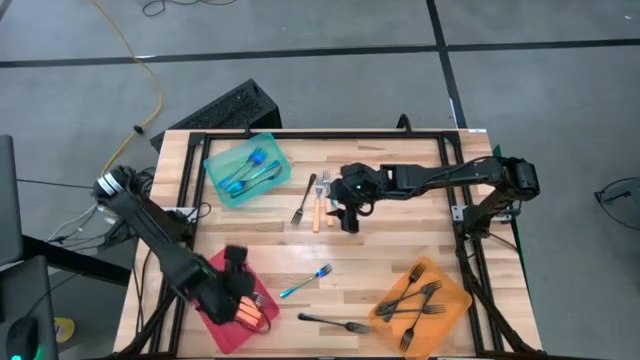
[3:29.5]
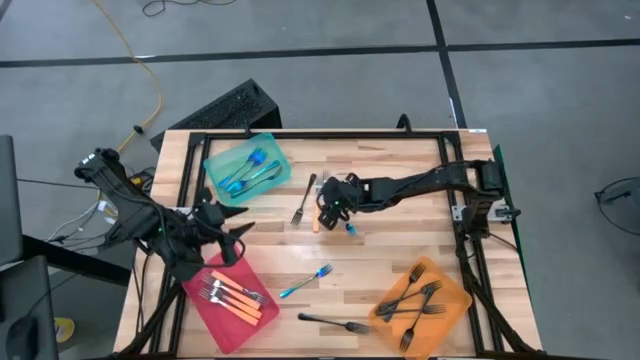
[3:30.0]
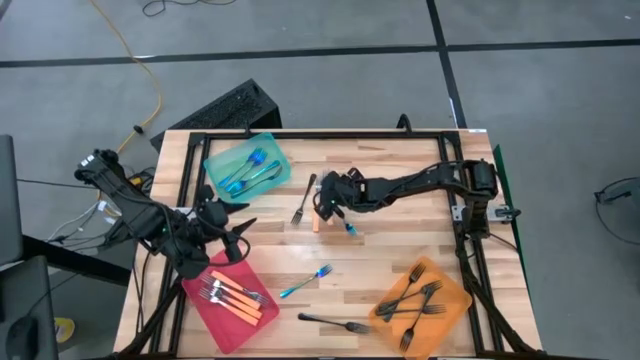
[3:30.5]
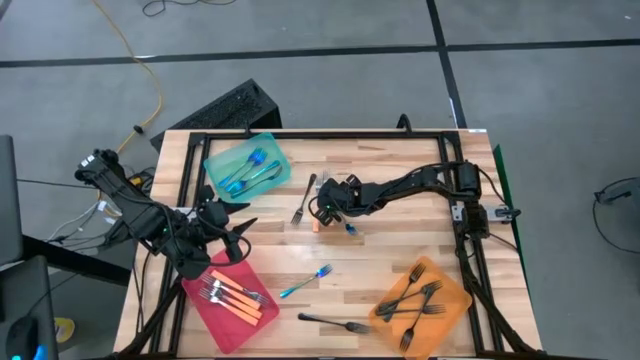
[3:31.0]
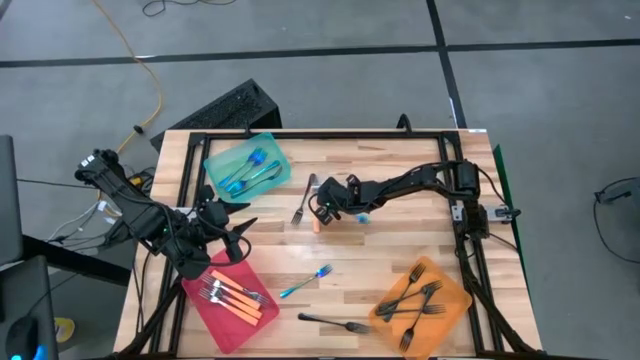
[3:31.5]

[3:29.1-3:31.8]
Task: Sort silverware by color (type)
Put the orange fork into the red bin

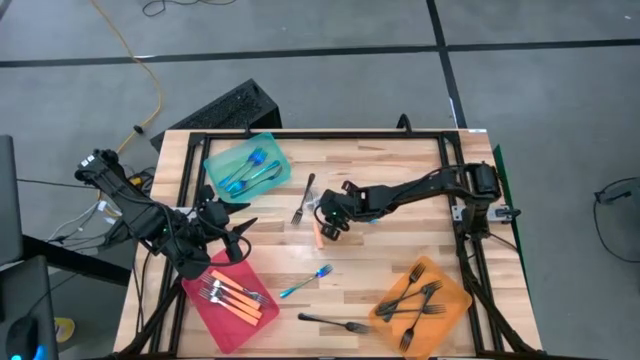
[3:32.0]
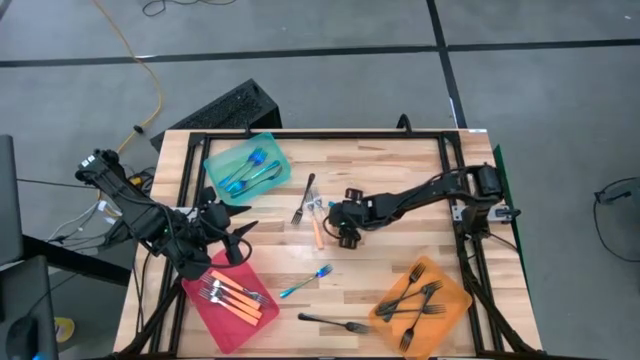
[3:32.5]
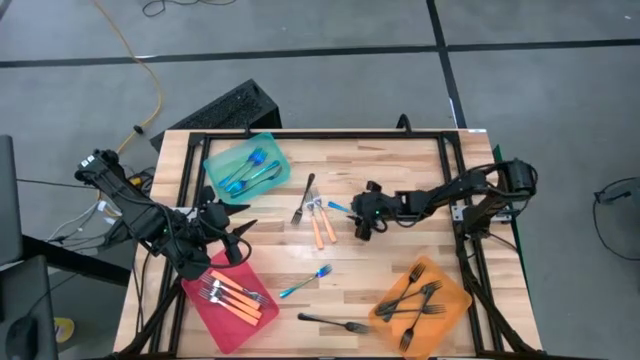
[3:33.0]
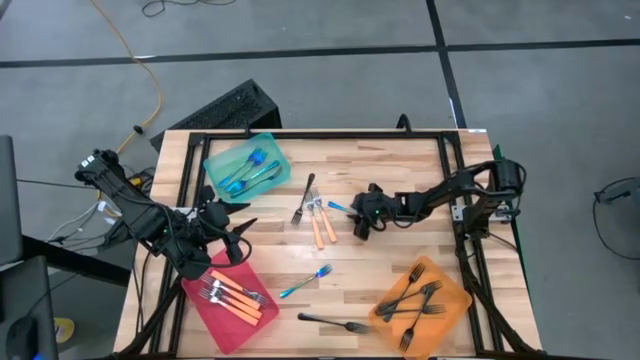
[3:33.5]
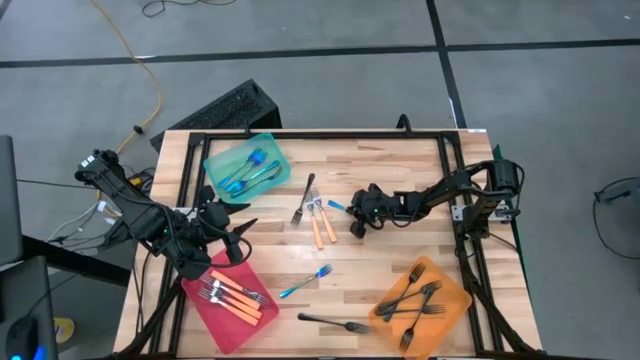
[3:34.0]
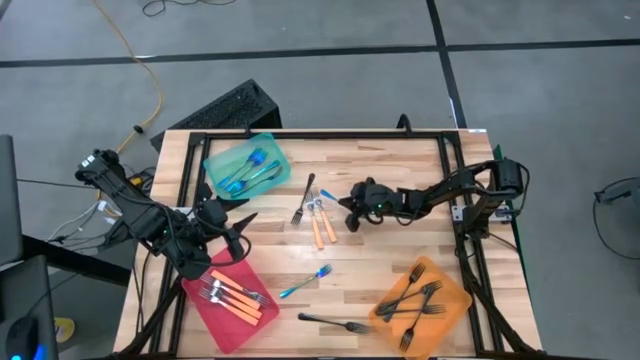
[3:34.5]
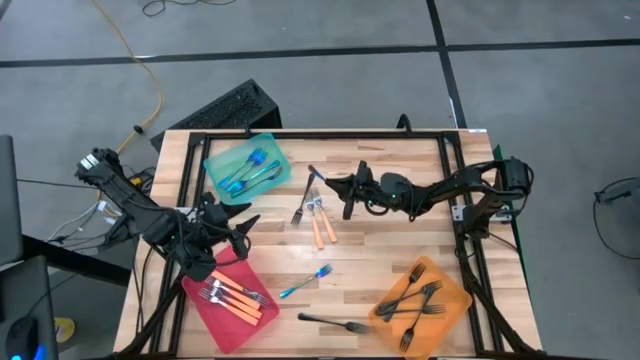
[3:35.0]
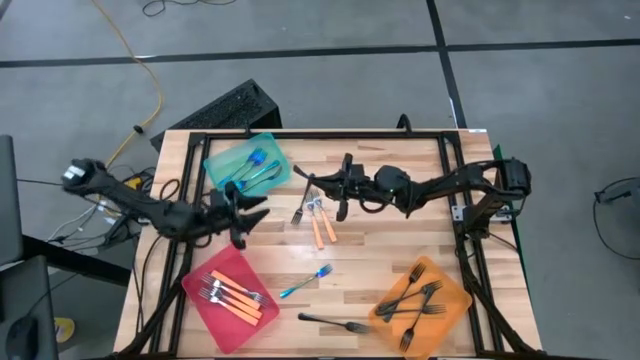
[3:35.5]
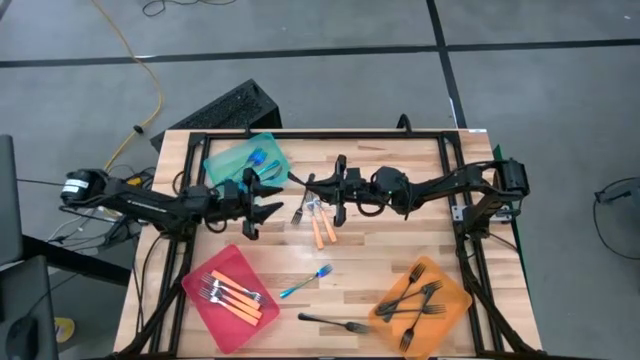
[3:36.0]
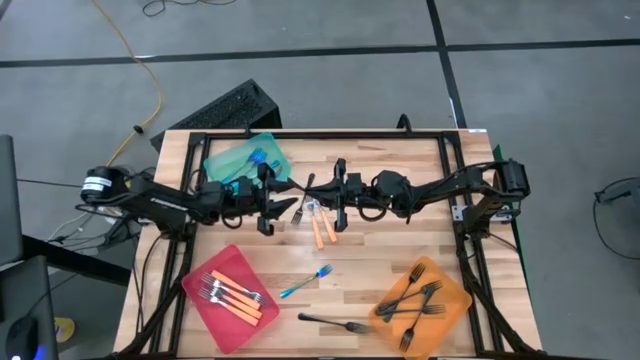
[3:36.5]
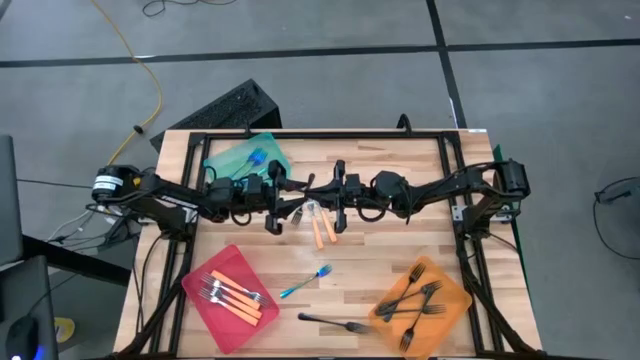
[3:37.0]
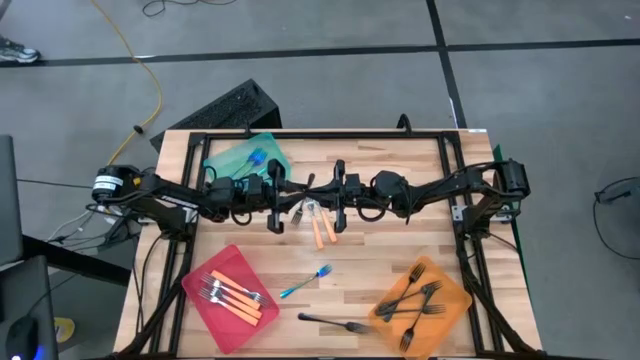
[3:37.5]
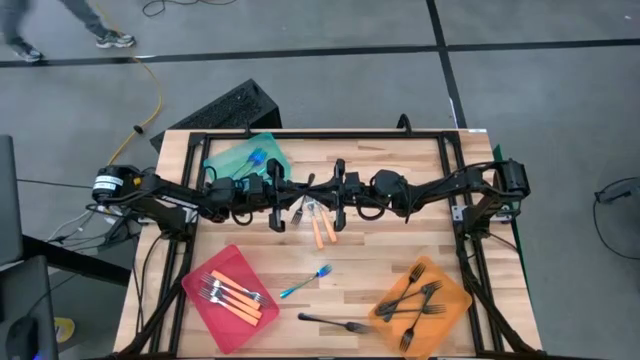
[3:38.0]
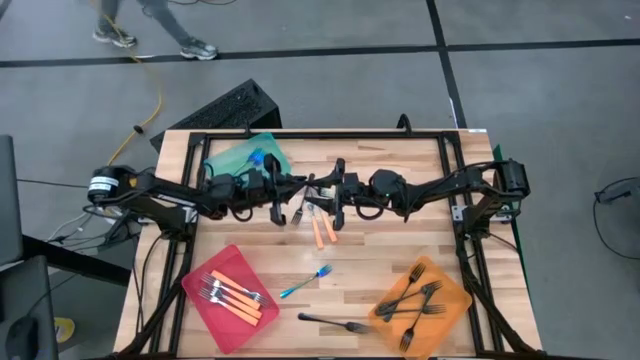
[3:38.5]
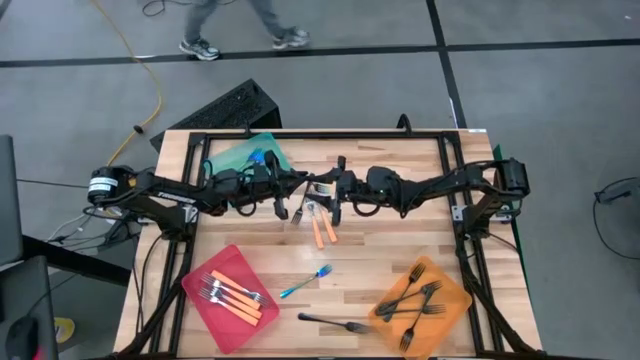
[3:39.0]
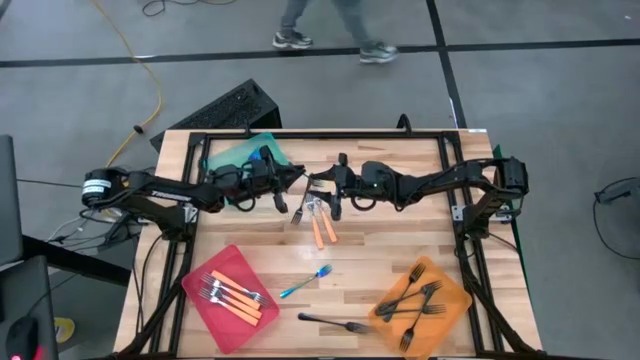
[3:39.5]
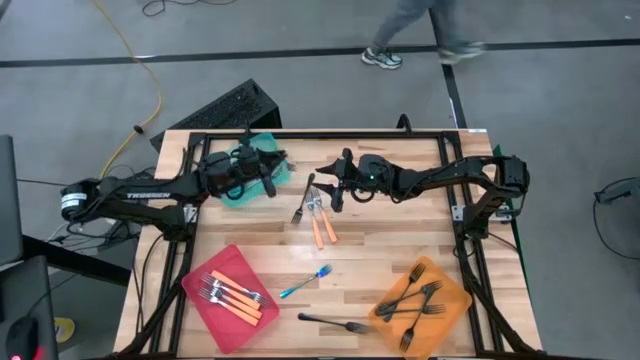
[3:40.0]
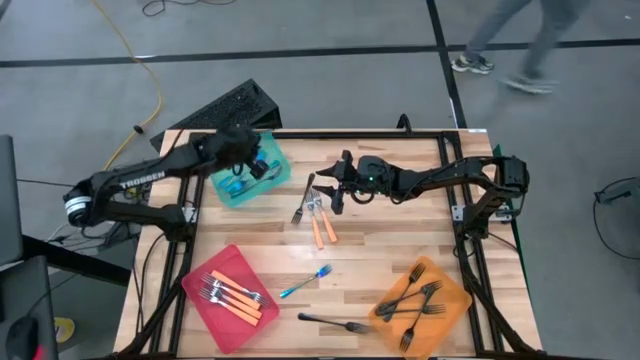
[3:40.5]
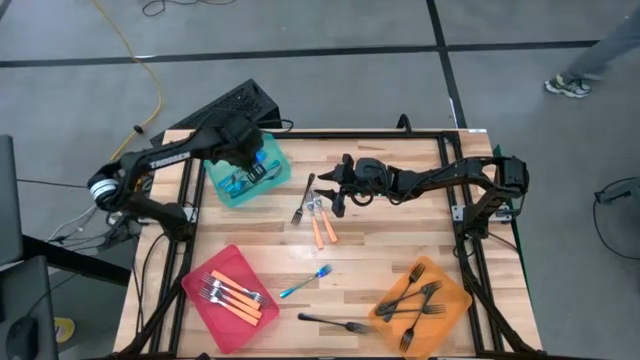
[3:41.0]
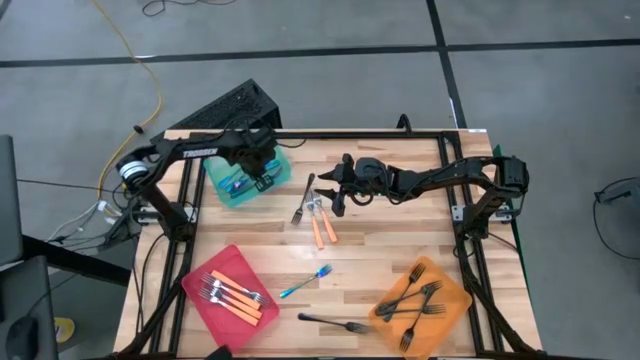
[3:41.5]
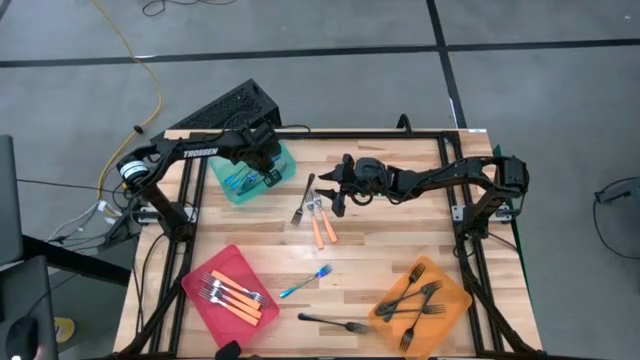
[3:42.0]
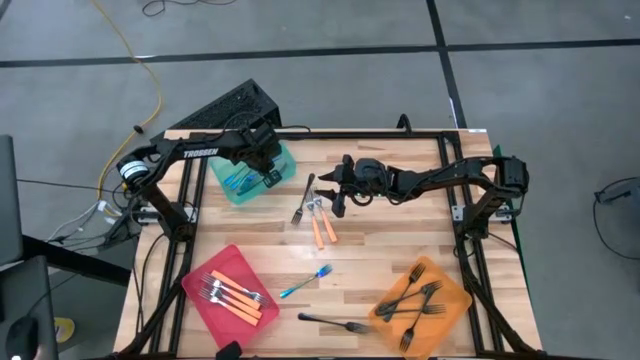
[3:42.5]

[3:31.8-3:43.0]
Put the blue fork into the blue bin

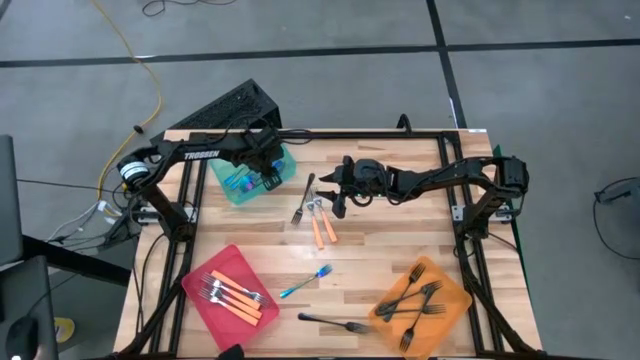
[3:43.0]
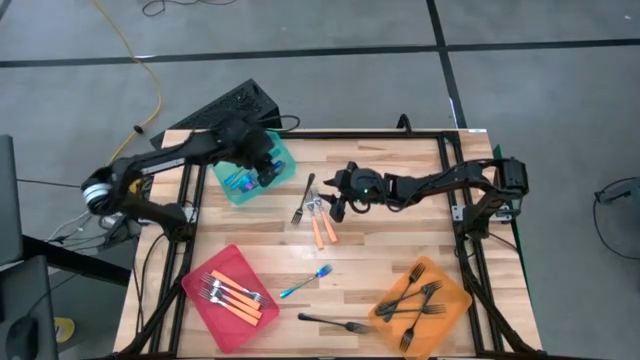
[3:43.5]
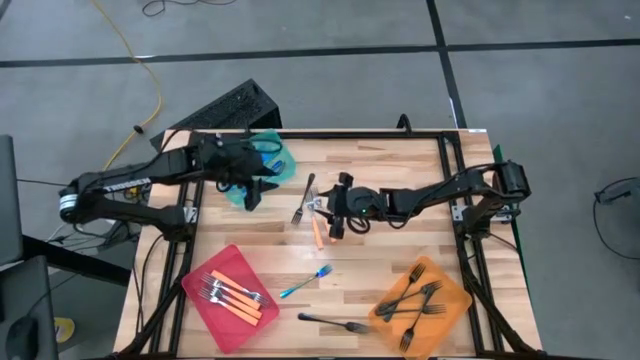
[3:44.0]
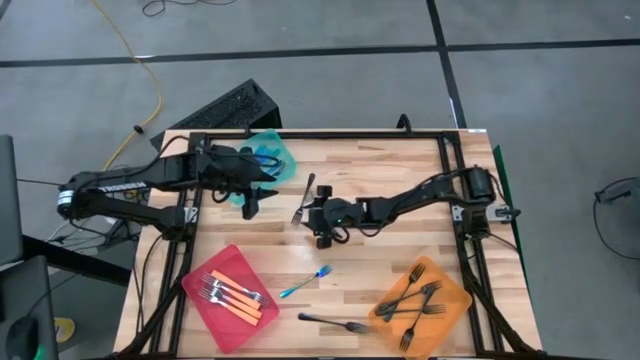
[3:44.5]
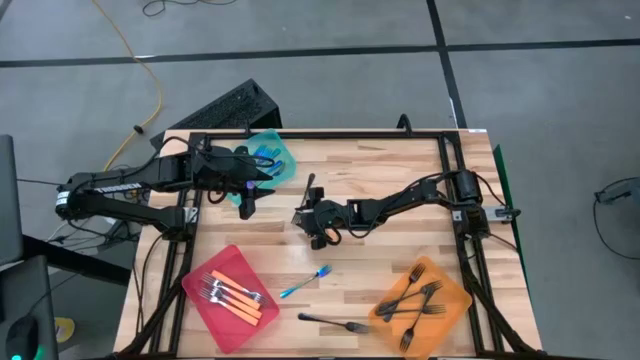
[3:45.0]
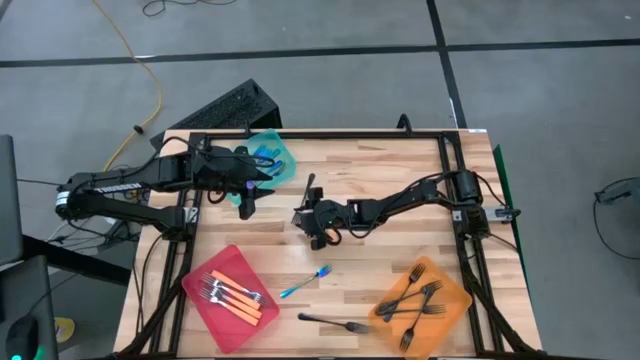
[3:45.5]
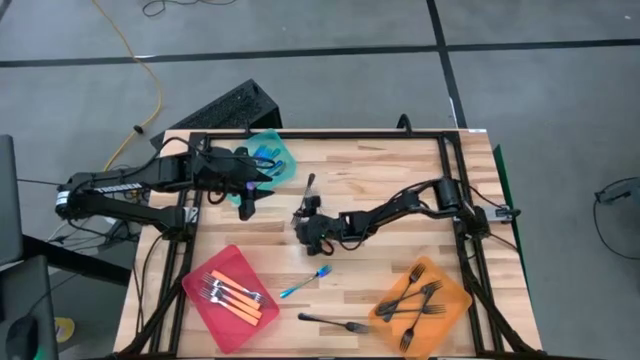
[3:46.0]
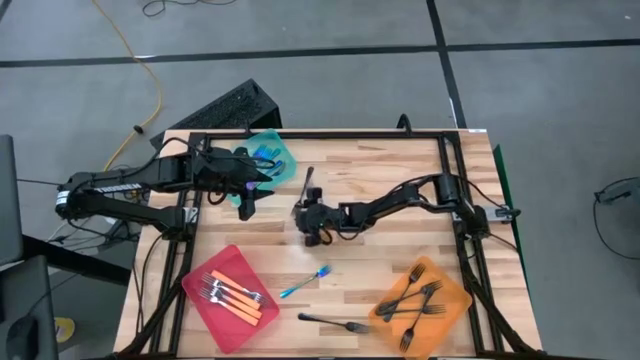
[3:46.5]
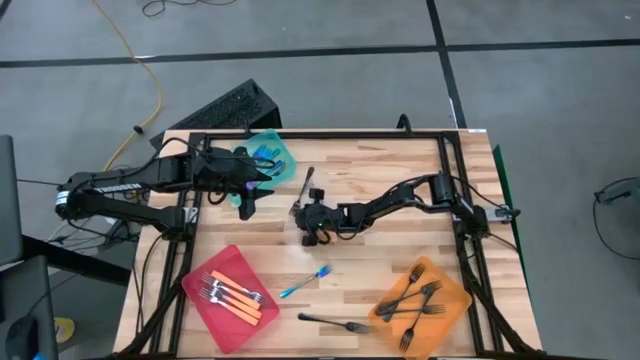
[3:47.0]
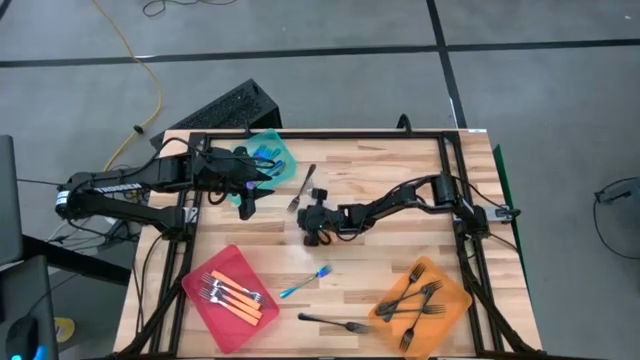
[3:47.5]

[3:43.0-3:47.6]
Put the black fork into the orange bin

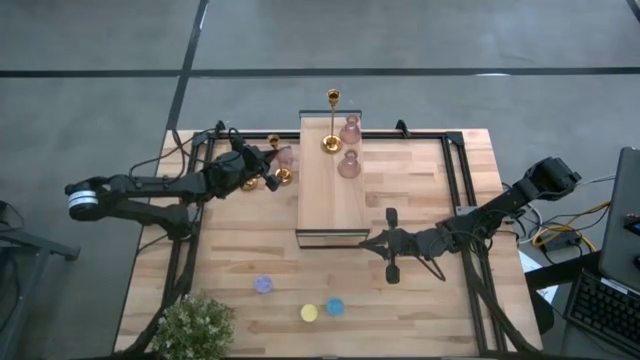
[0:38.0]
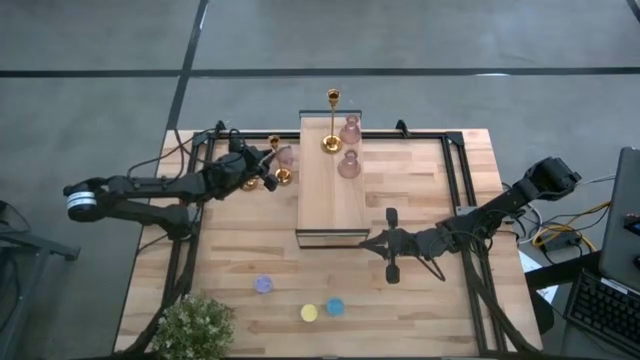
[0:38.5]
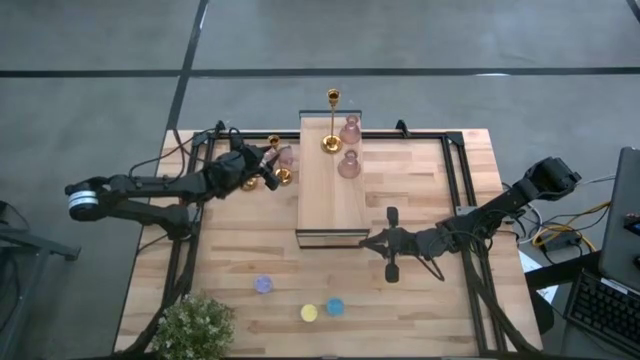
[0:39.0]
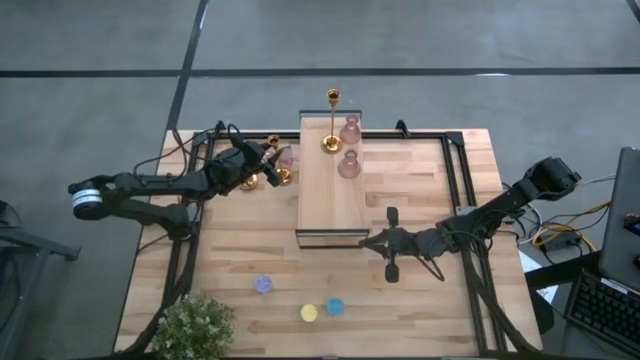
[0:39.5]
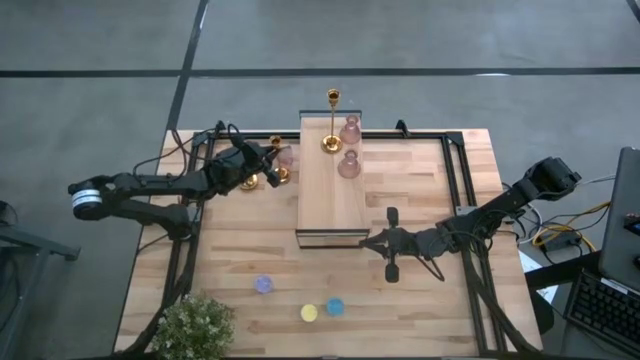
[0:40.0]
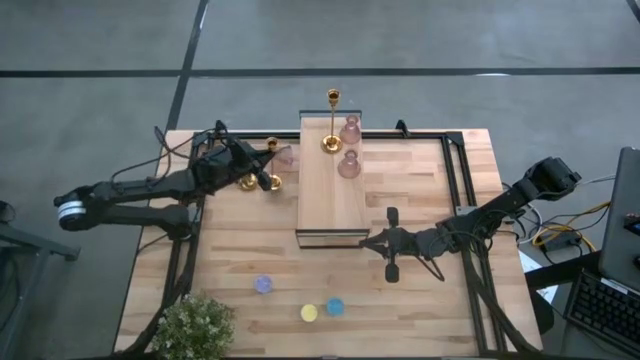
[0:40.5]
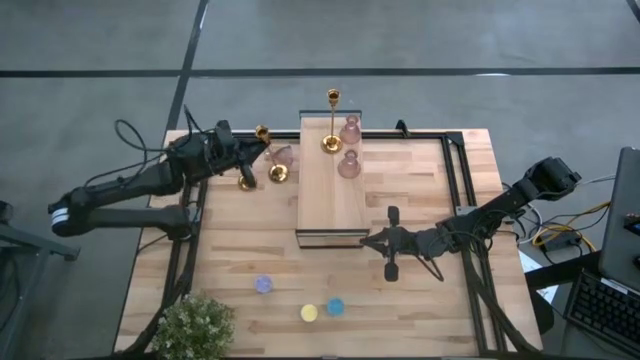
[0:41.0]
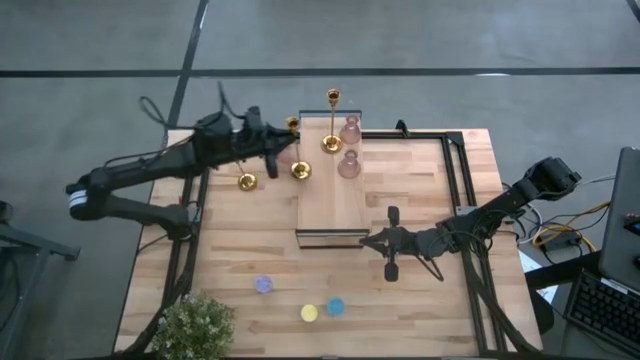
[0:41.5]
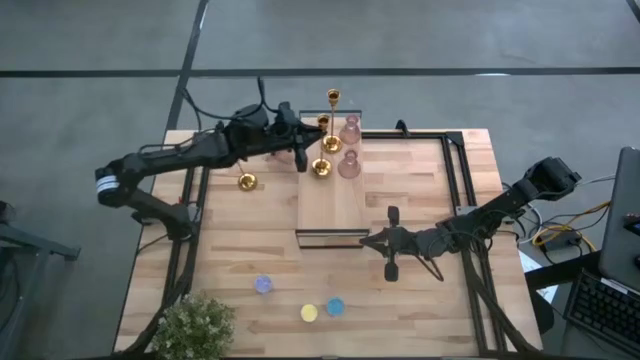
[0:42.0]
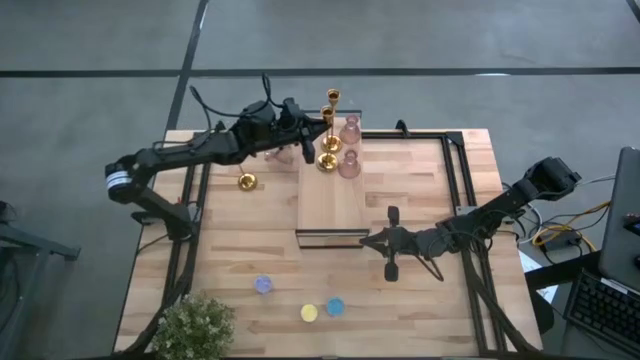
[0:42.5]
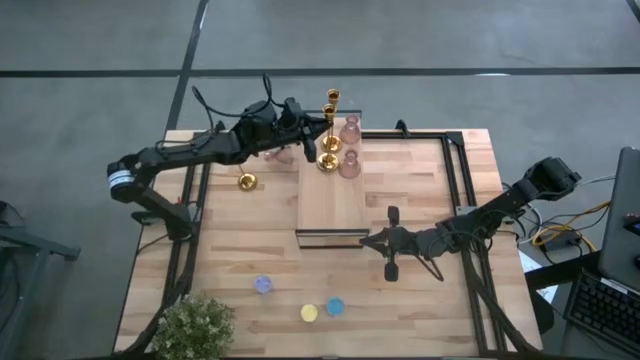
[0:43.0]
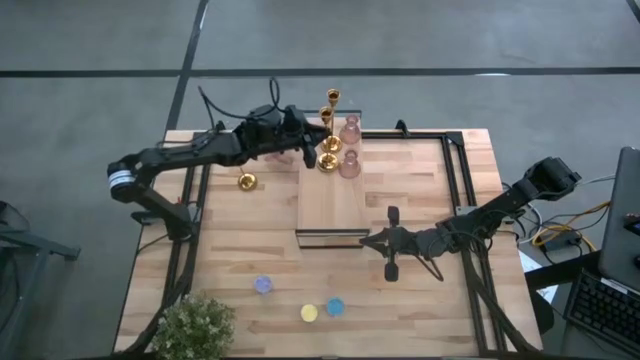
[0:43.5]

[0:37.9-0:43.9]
Task: Pick & Place candle stick holders
Put the right gold candlestick on the shelf
